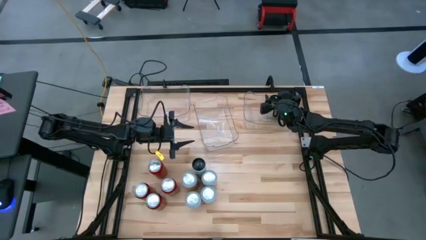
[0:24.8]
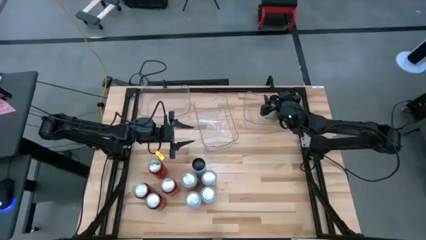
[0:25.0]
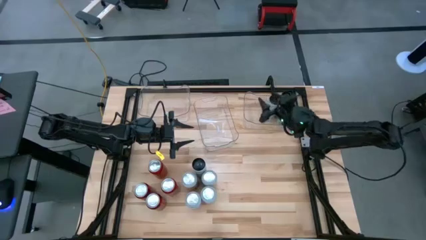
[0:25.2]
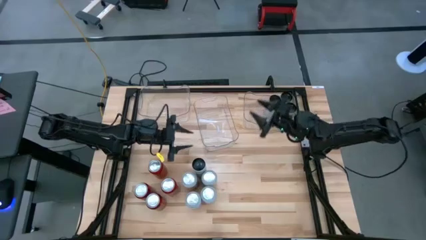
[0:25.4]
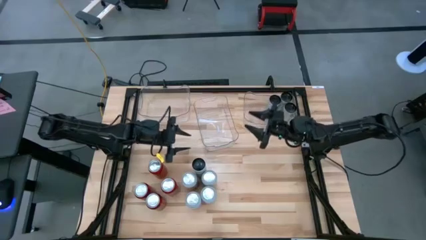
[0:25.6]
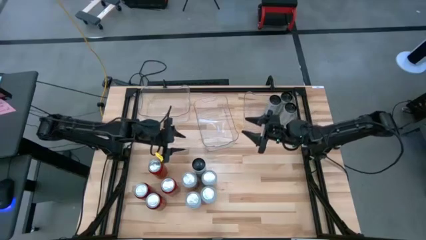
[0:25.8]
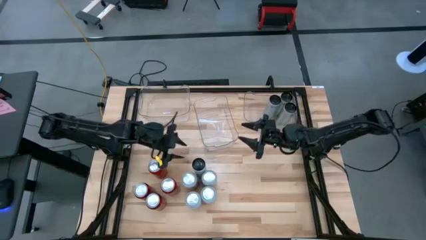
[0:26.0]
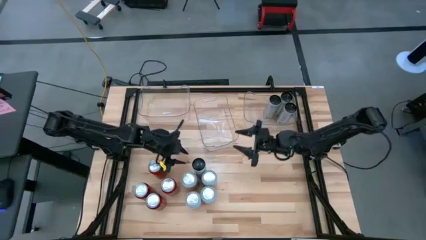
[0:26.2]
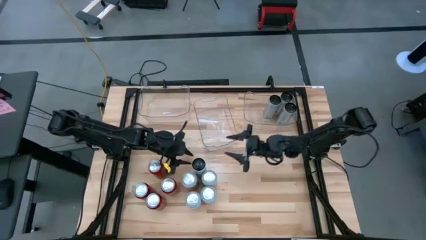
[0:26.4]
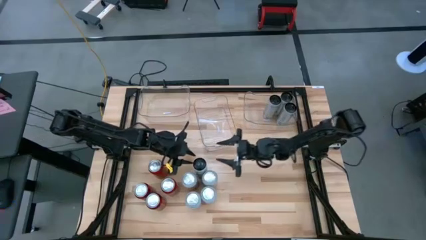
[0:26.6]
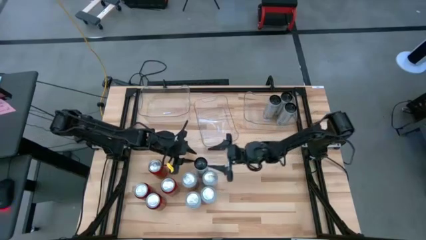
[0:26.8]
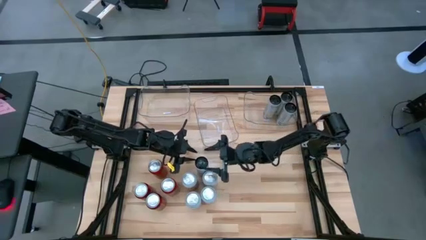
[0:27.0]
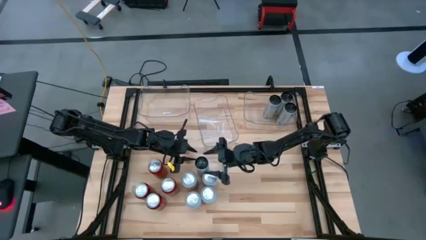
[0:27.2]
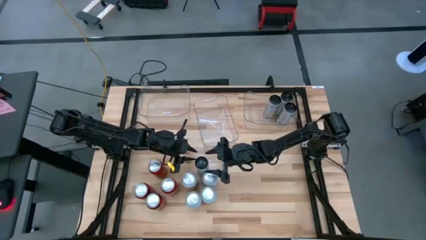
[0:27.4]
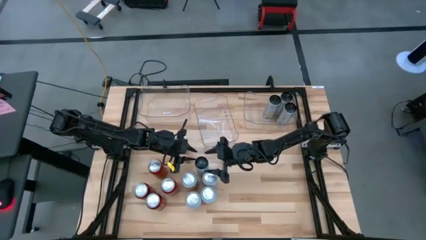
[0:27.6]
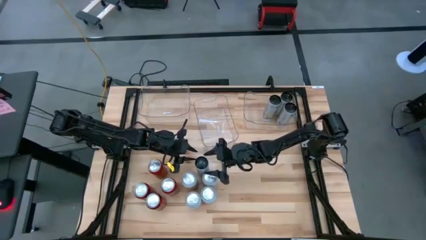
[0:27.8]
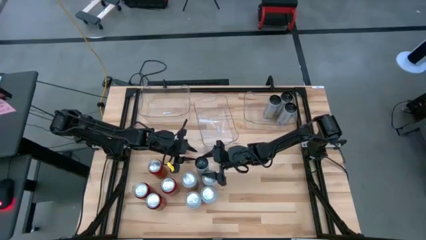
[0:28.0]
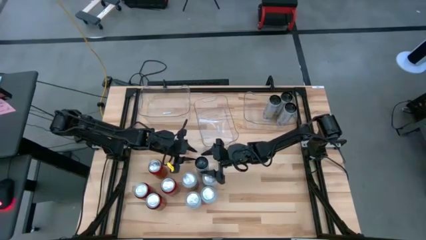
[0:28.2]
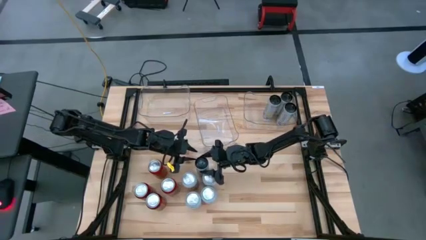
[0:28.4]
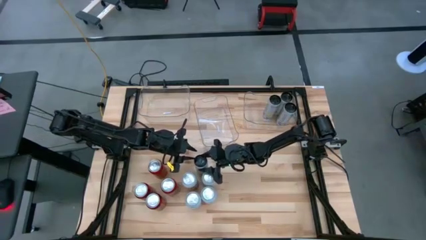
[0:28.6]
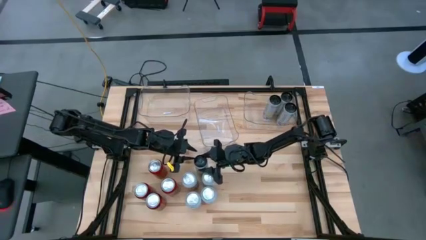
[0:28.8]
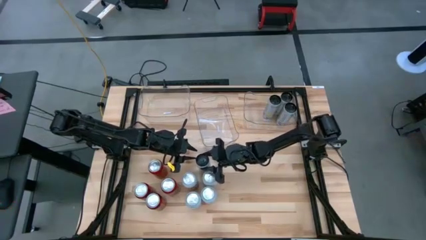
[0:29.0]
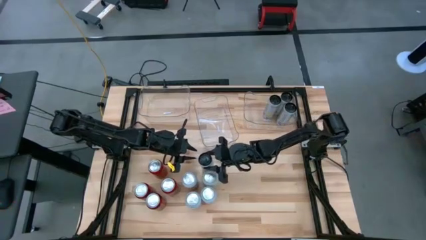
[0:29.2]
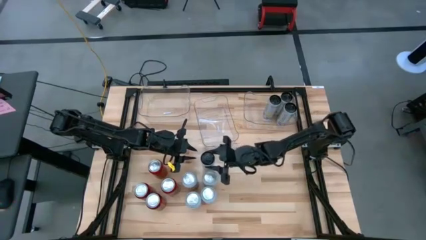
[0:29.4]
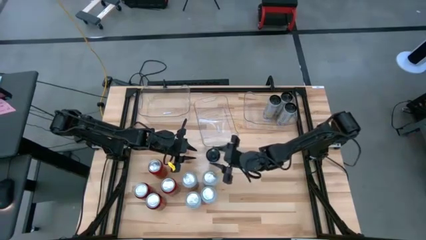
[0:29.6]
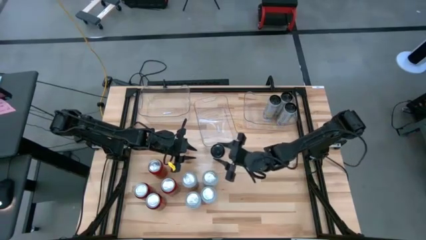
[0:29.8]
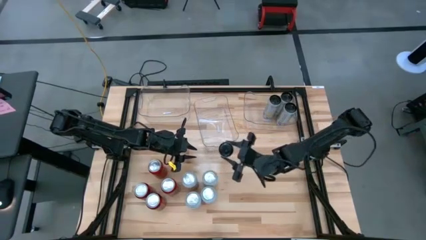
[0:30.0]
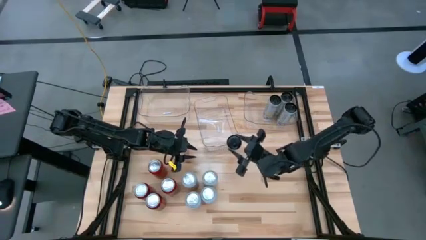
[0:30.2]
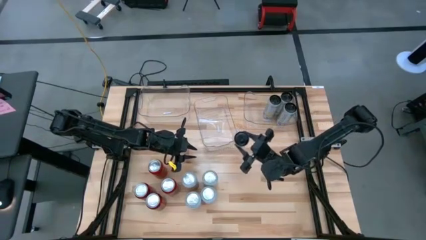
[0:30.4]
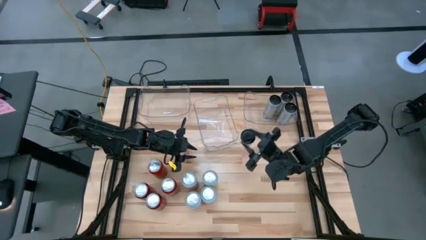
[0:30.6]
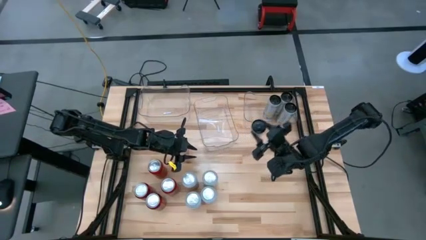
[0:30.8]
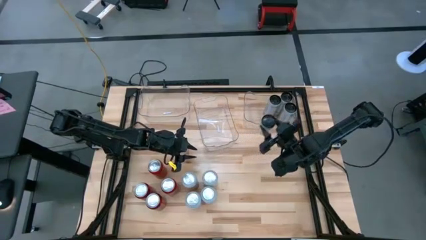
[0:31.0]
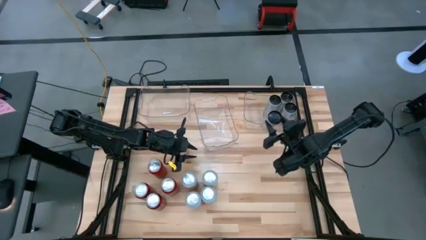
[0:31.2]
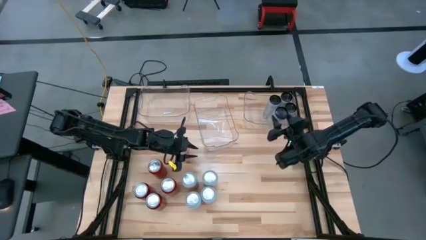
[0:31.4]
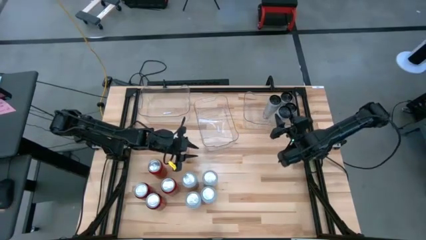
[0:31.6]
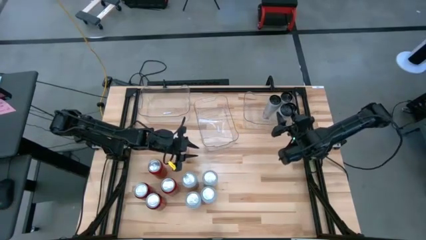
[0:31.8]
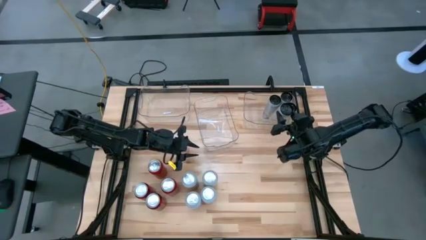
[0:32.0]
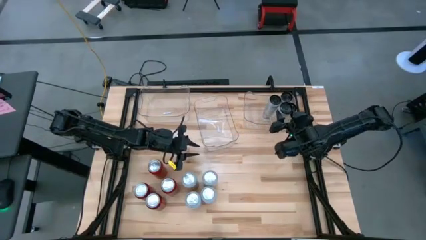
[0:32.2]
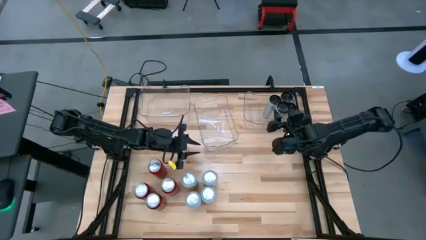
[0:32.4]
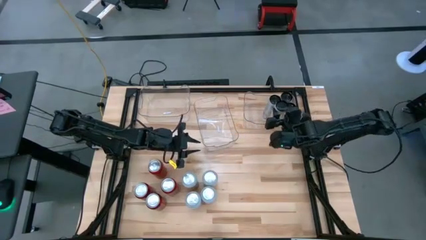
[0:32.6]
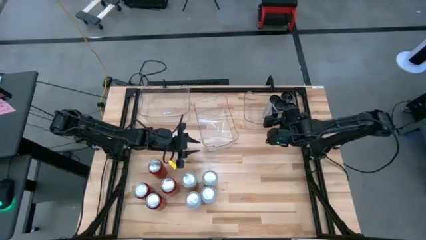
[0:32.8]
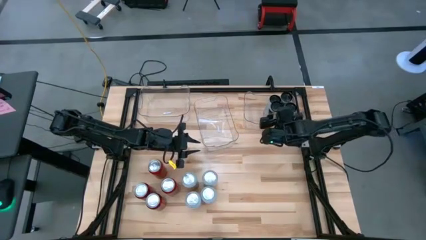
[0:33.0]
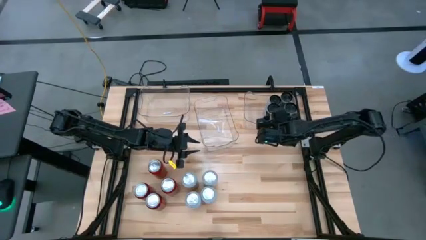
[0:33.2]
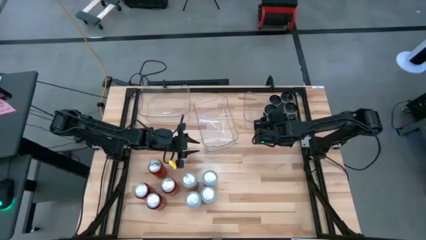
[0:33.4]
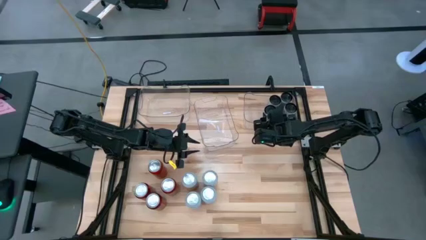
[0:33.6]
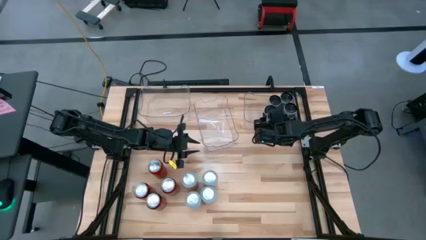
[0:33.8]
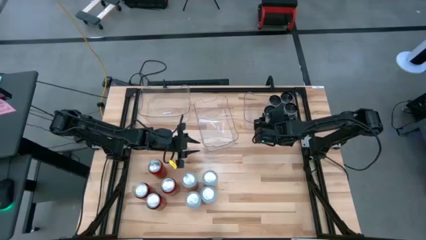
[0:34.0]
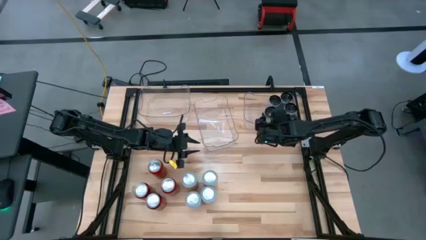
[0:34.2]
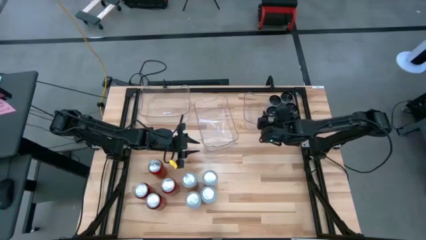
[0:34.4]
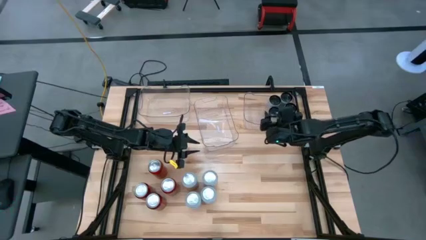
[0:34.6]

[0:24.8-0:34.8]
Task: Sort soda cans
Put the black and white soda can in the right transparent bin

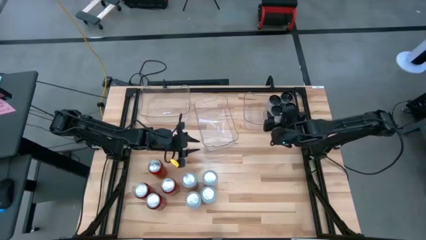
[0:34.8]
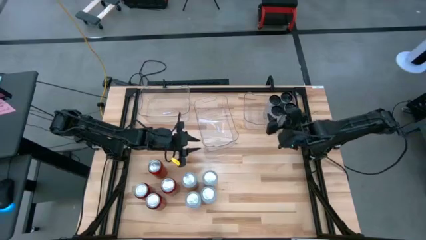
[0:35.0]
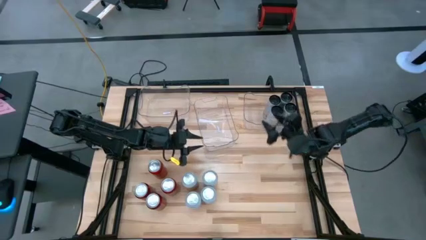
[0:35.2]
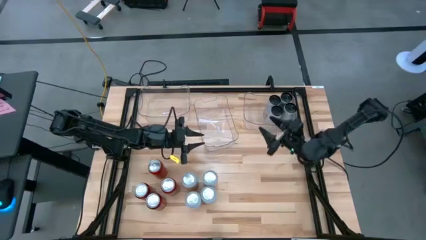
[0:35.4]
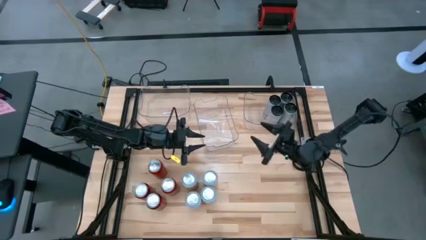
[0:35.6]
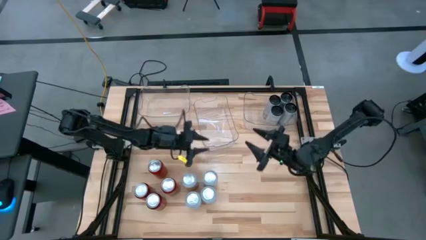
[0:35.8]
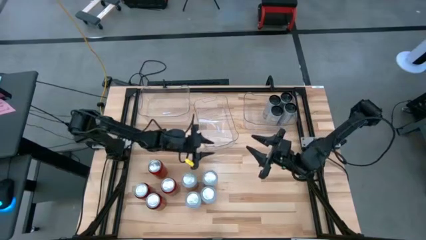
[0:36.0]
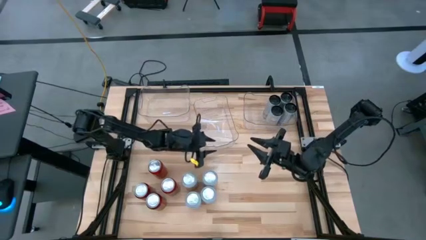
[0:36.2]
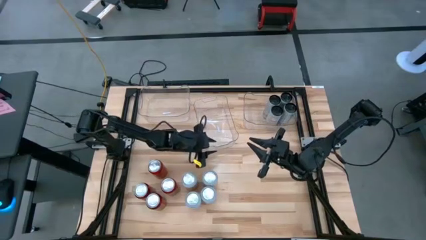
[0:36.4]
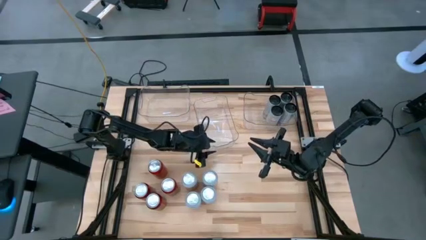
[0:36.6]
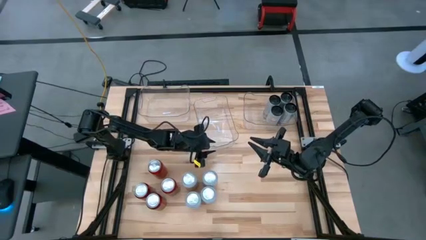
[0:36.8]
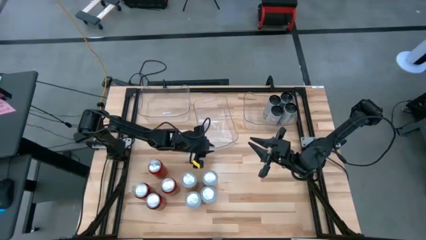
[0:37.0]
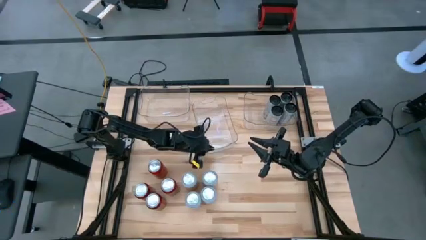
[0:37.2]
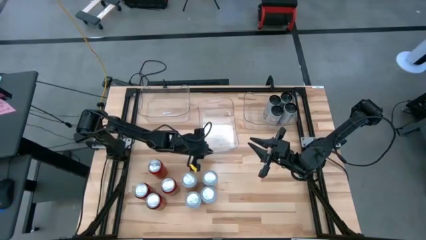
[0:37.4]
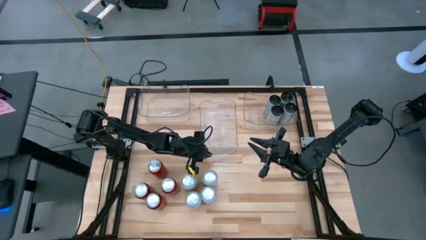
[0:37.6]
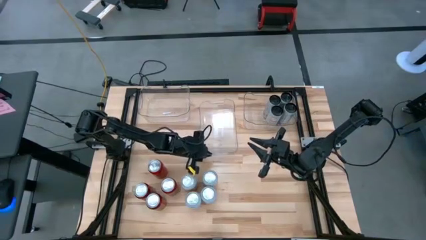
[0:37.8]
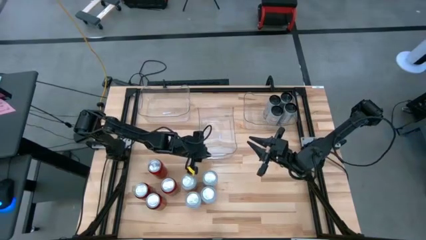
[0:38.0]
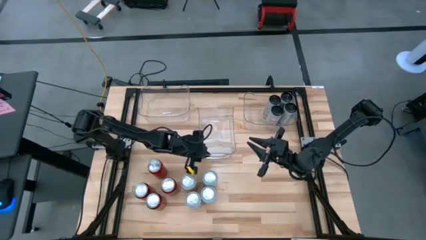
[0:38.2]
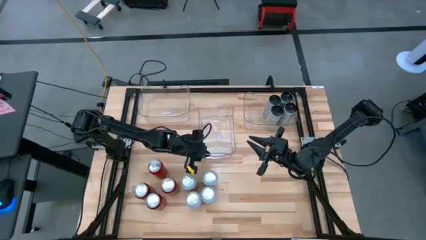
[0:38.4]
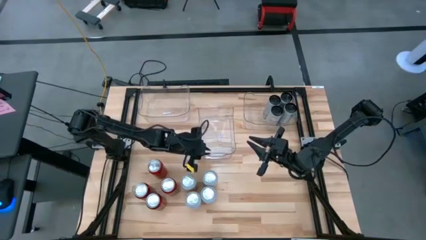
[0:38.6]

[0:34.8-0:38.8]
Adjust the middle transparent bin

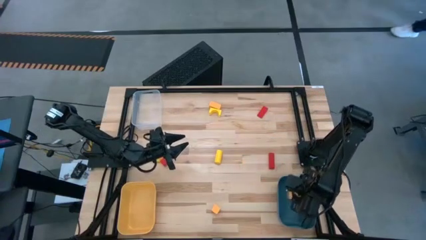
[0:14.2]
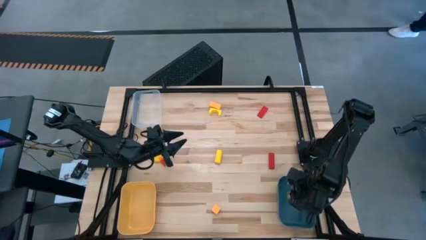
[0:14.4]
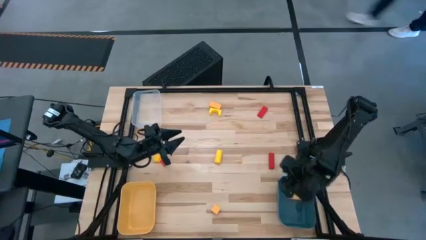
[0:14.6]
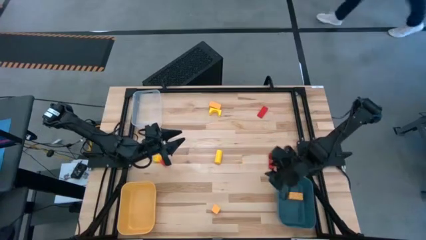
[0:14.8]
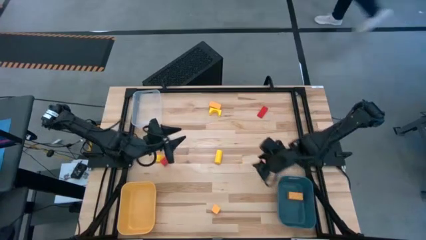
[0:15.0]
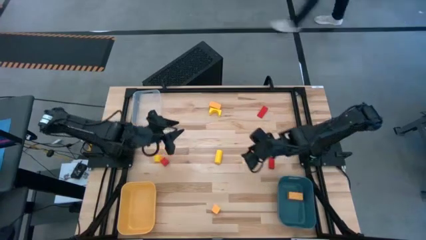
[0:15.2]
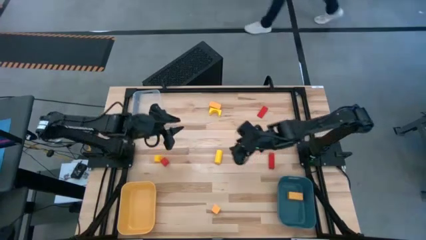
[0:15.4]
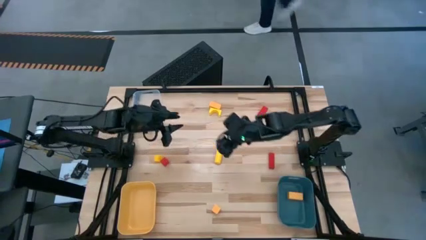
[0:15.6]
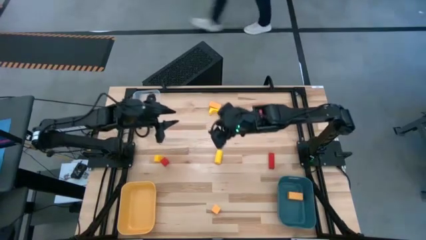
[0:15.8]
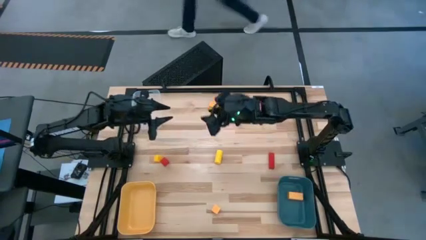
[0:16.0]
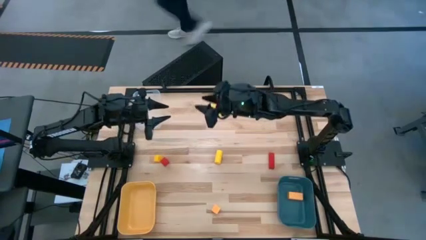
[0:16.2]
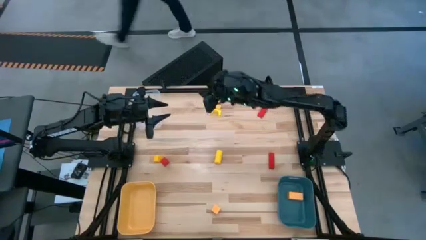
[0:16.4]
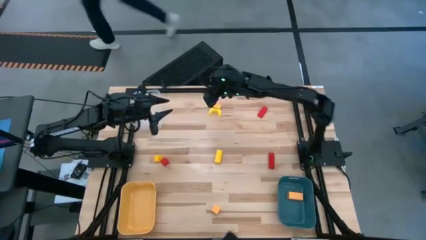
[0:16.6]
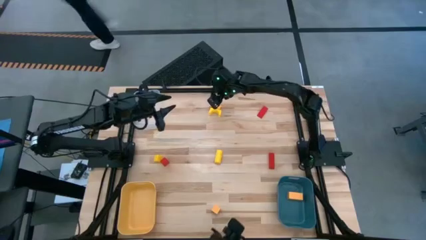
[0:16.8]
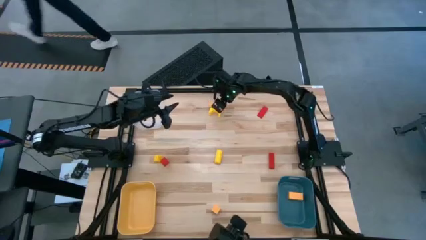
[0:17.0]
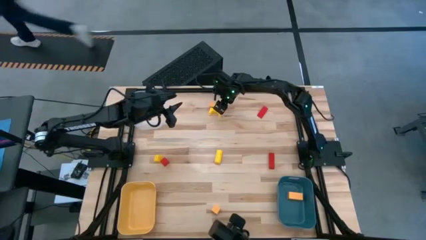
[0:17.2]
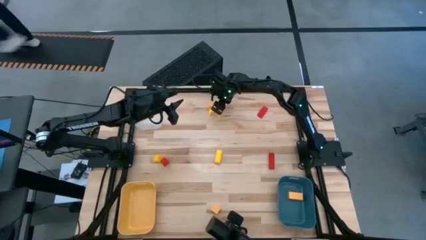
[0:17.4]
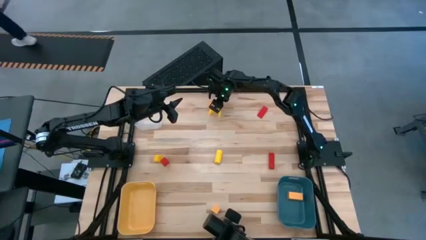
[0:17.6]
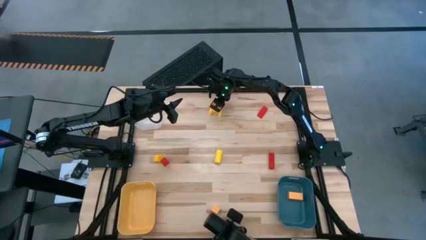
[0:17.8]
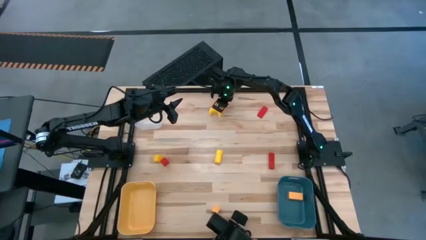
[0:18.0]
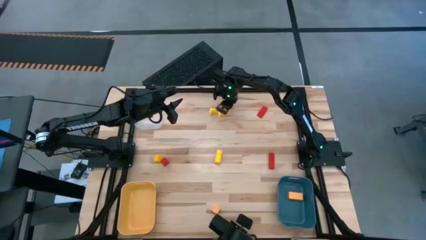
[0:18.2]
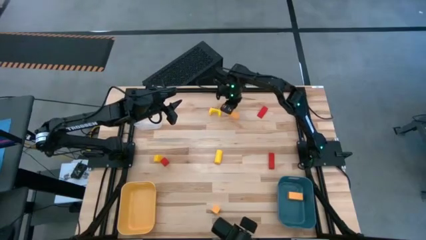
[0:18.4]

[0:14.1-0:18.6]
Task: Sort & place blocks by color
Put the top orange block in the dark green bin
